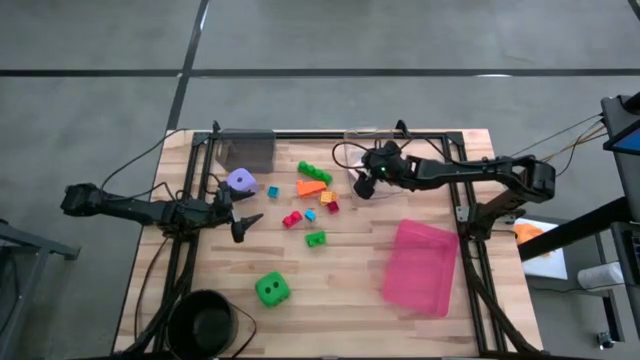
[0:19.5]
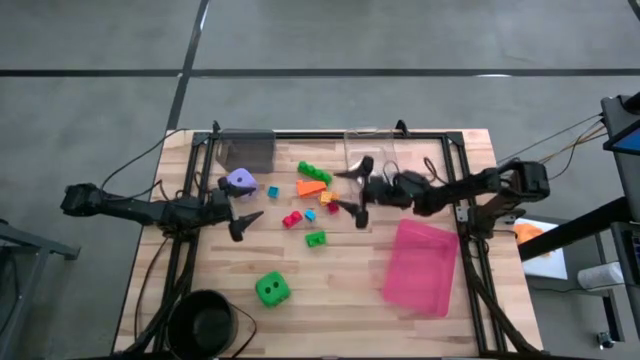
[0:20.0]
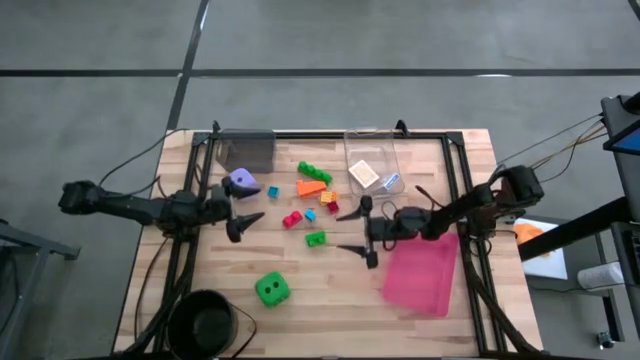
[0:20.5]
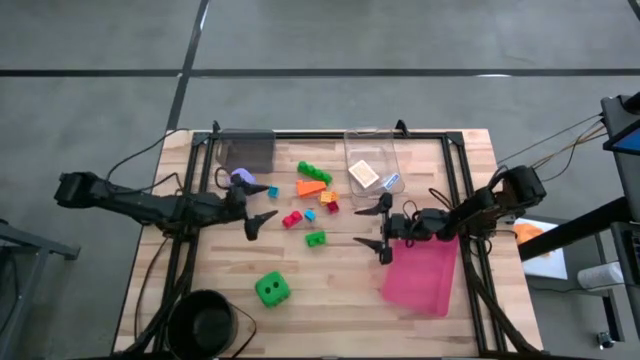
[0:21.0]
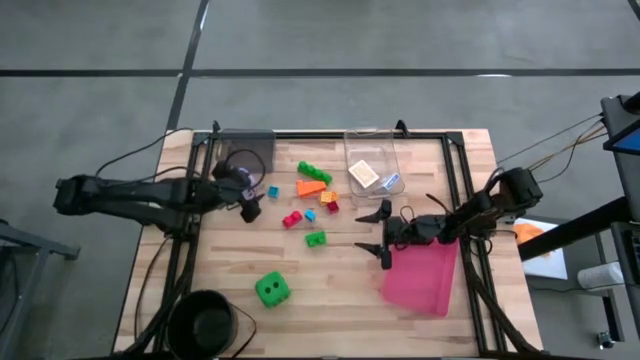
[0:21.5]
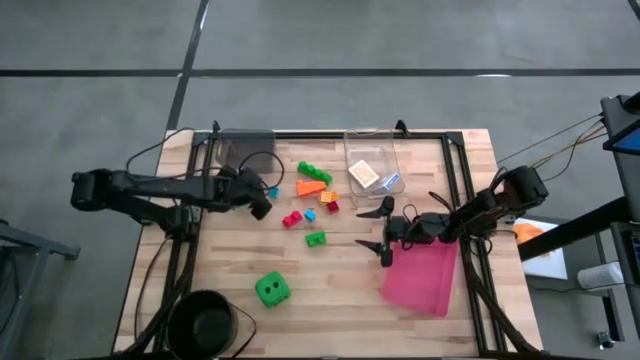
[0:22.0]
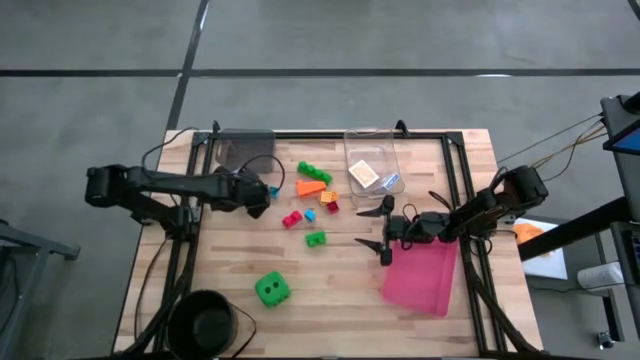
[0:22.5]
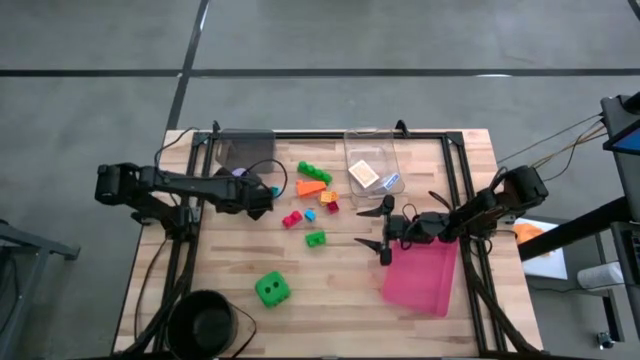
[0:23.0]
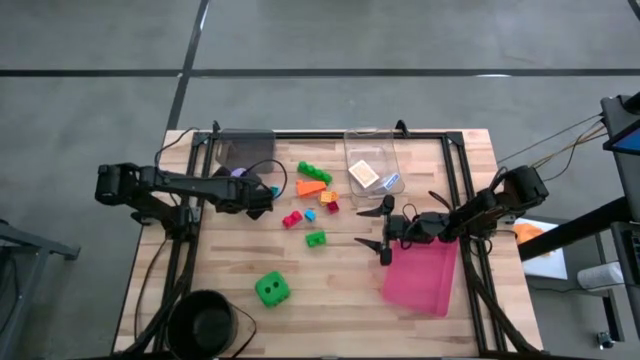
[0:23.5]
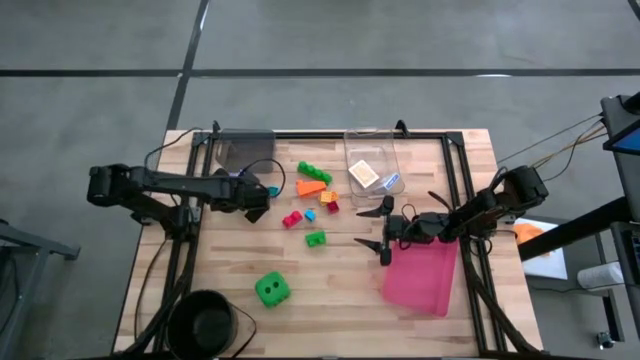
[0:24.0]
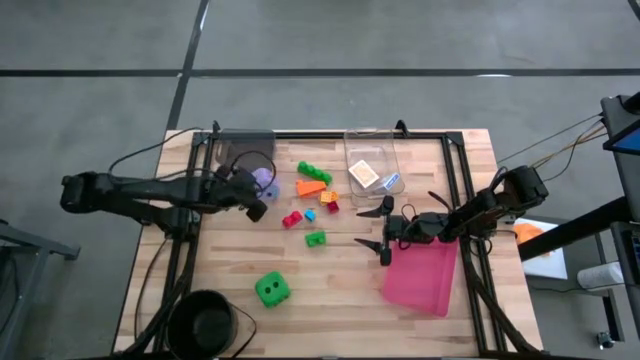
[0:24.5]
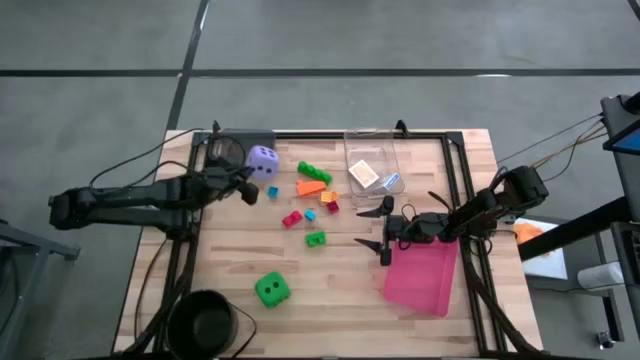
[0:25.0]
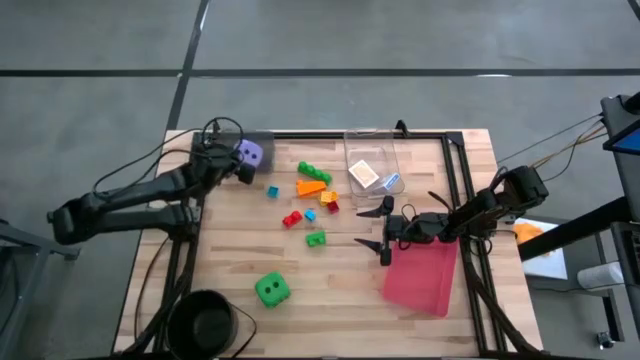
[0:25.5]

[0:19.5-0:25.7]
Task: Pick & Place Toys
Put the purple die into the black bin

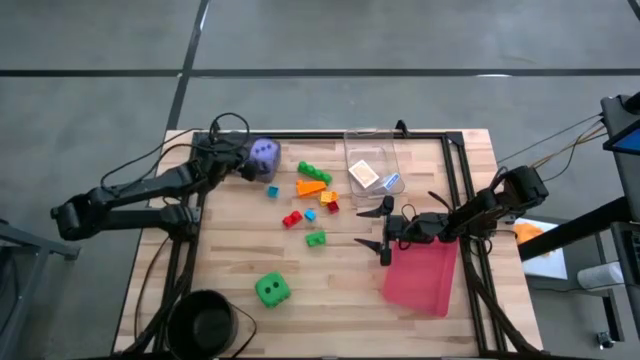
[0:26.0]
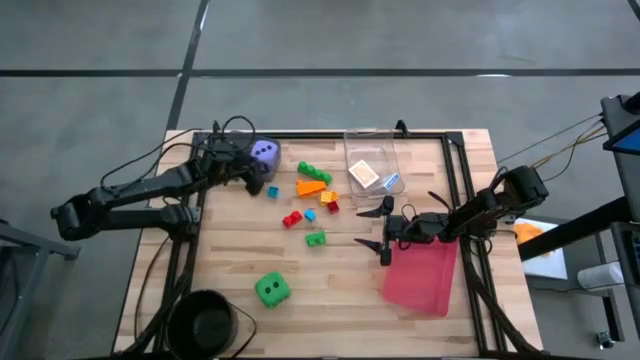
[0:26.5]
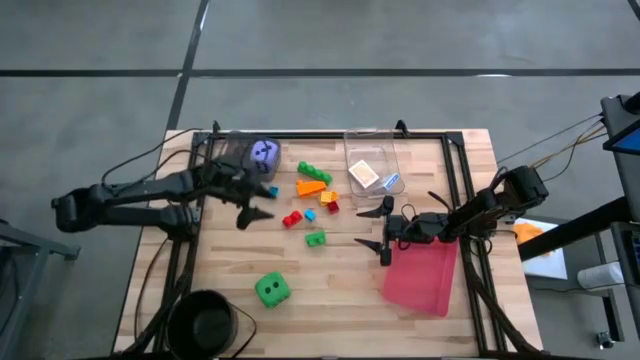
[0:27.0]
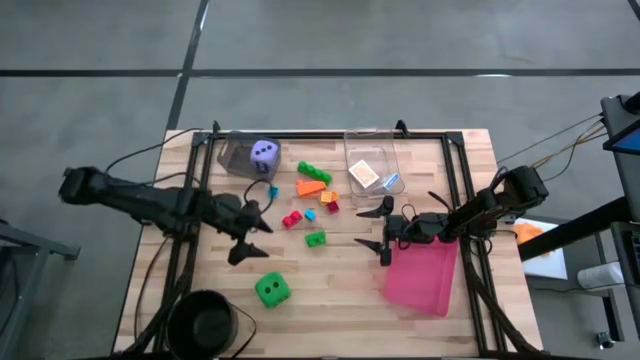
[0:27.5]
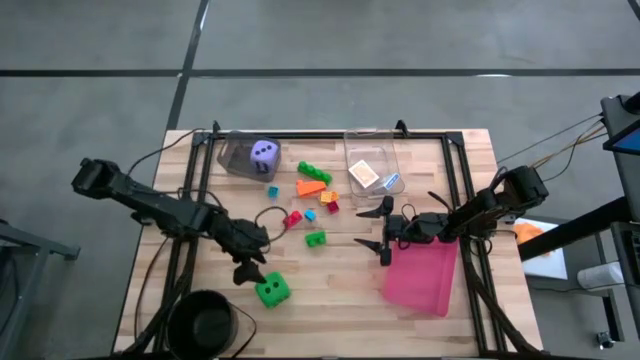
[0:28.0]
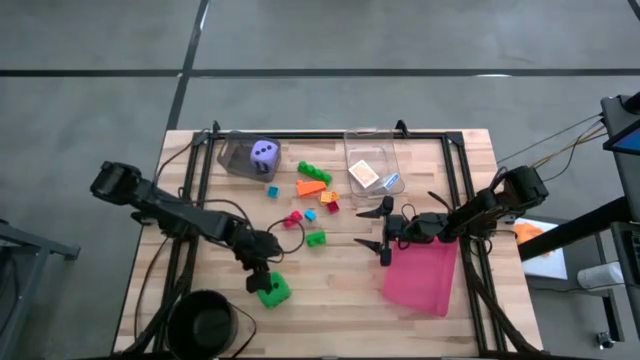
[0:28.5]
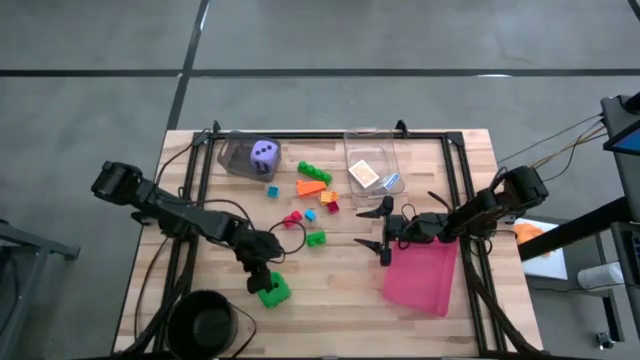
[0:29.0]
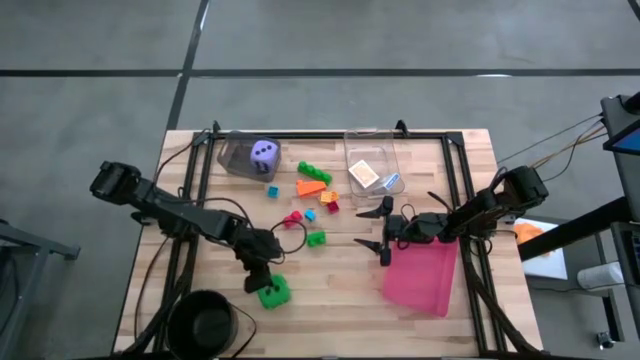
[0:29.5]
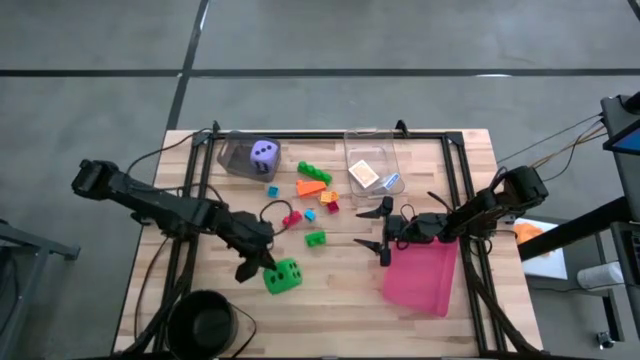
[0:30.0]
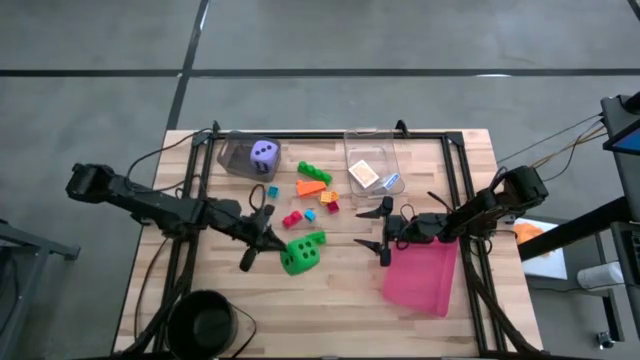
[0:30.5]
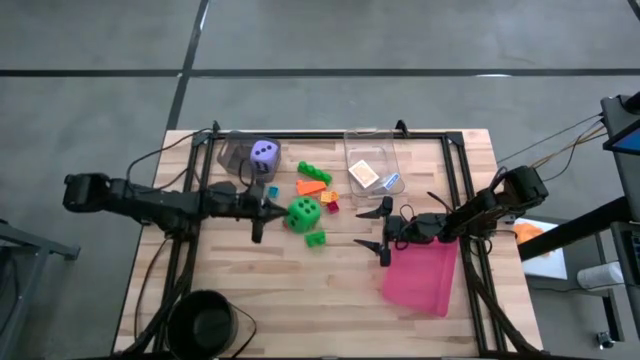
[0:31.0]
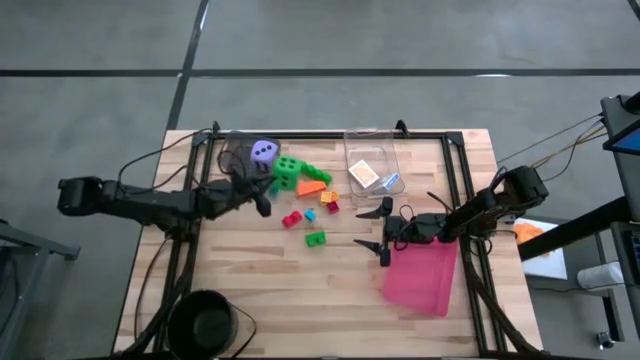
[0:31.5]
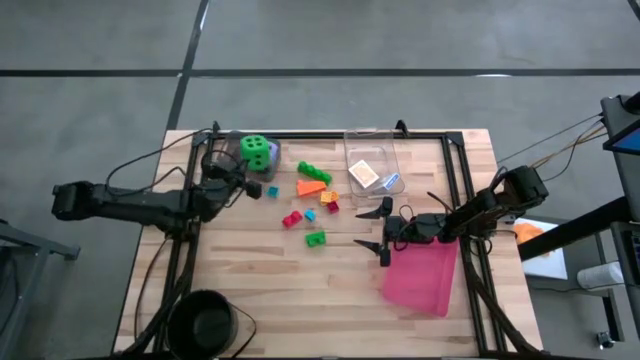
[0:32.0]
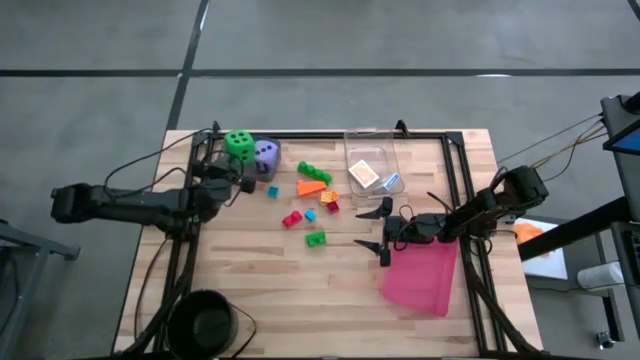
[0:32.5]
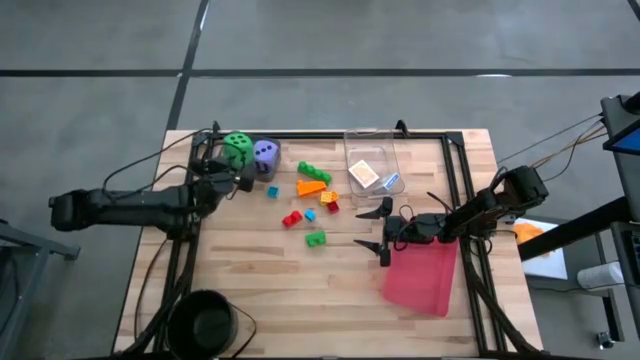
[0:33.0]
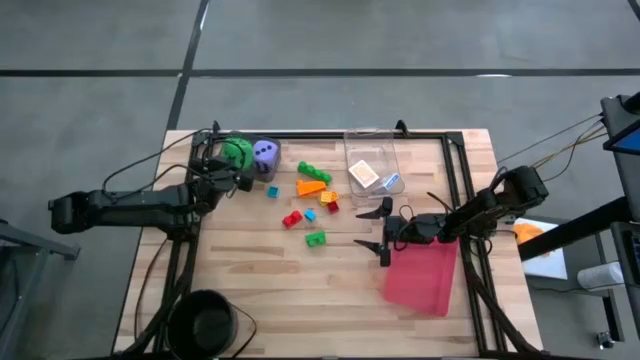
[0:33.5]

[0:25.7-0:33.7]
Put the green die into the black bin

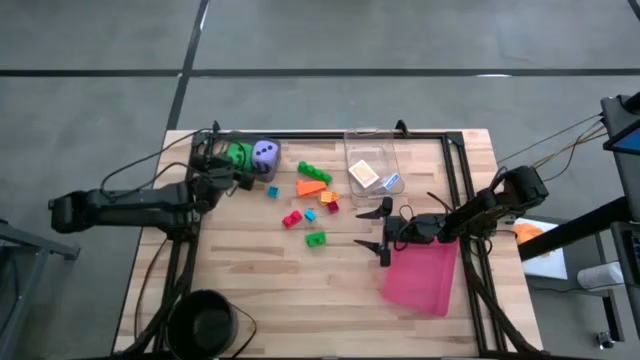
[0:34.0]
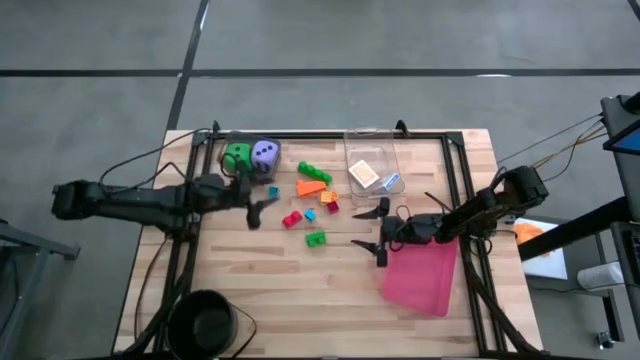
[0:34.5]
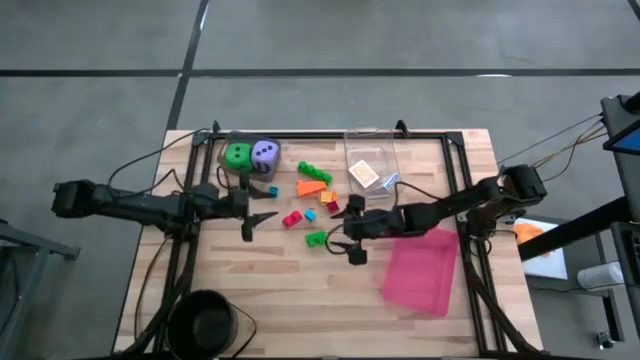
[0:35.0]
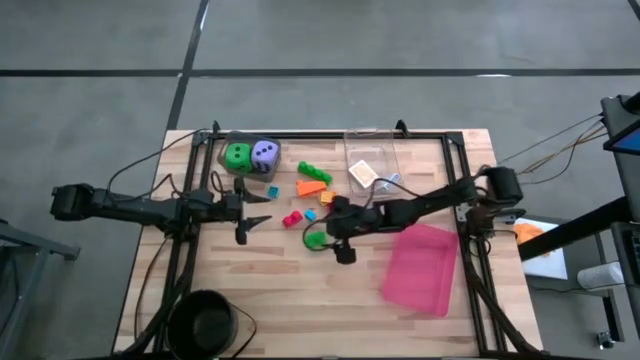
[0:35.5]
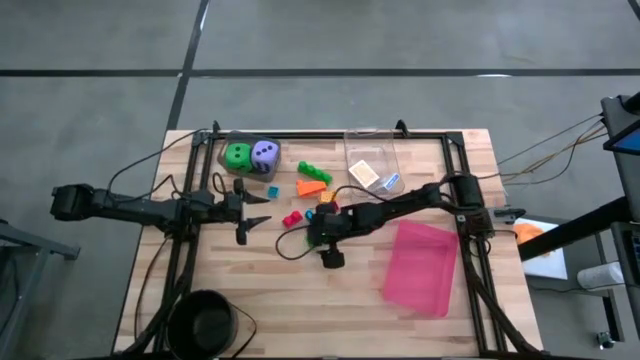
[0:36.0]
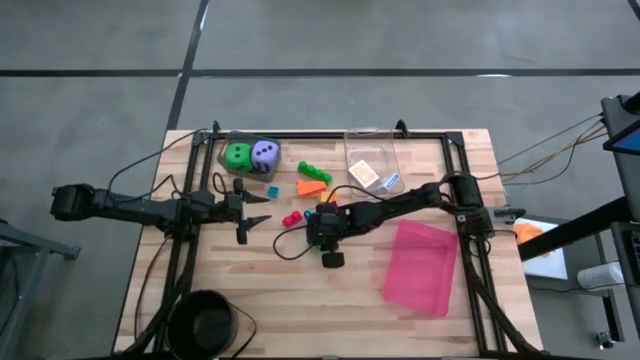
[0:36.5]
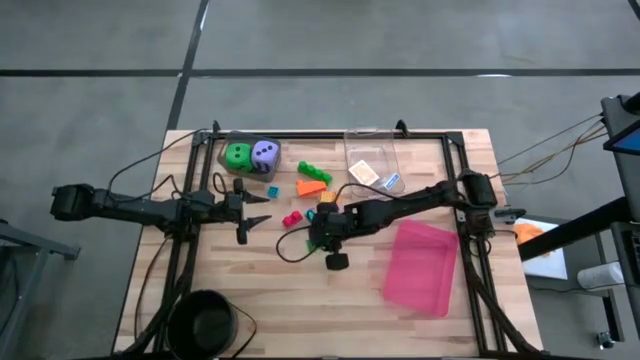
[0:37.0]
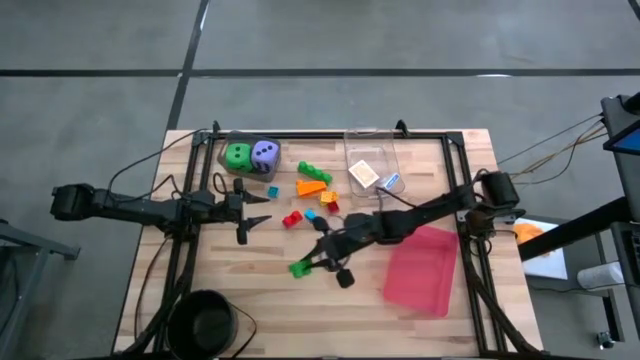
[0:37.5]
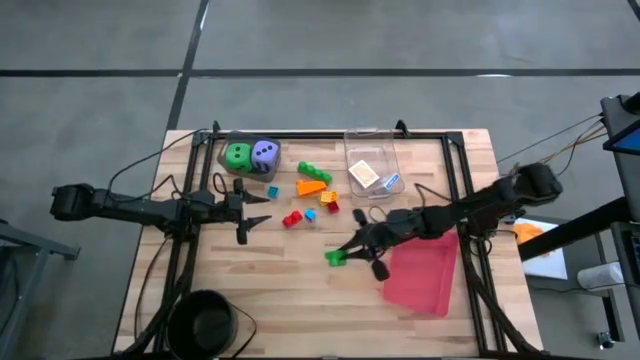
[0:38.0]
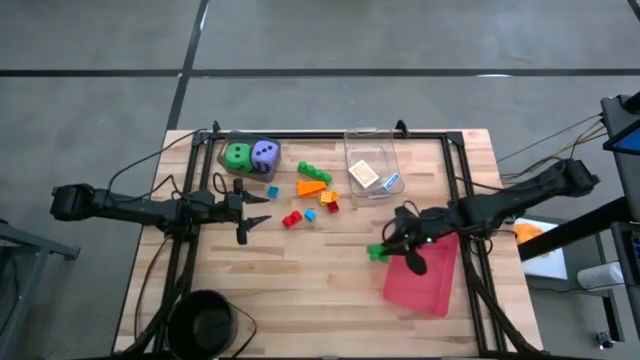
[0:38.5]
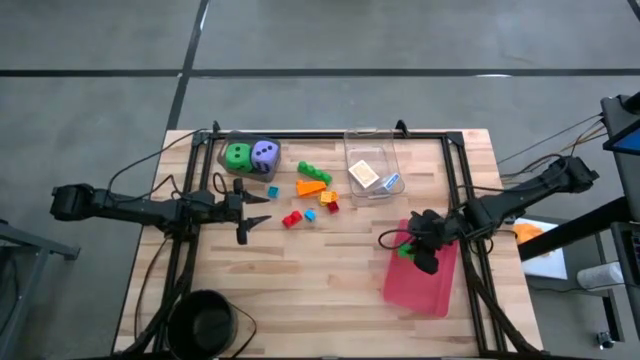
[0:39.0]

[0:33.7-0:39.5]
Put the bottom green game piece into the pink bin
